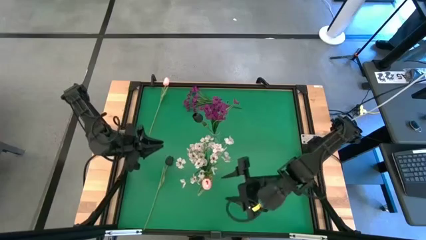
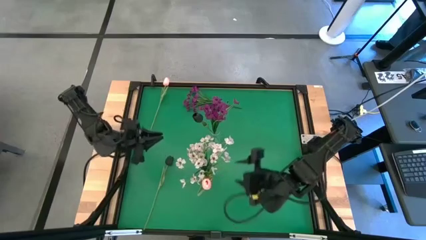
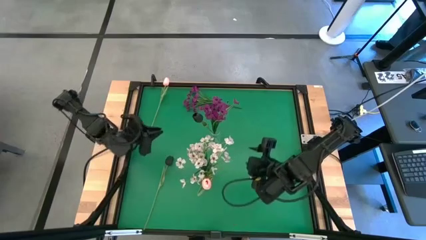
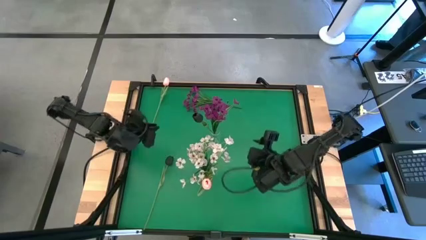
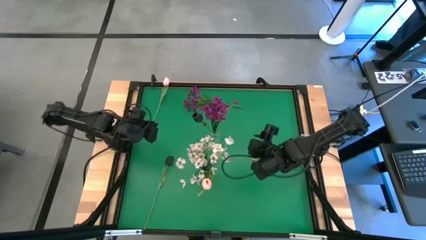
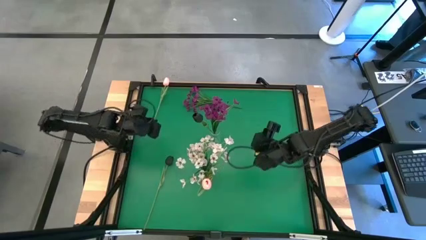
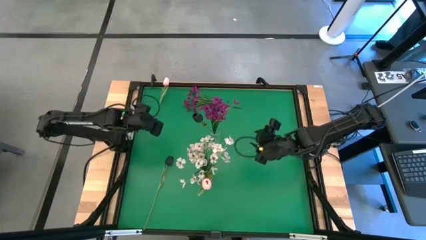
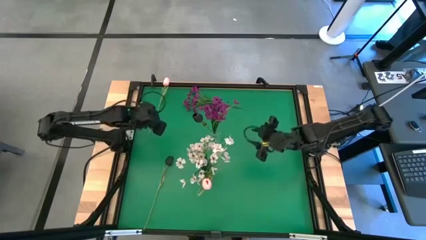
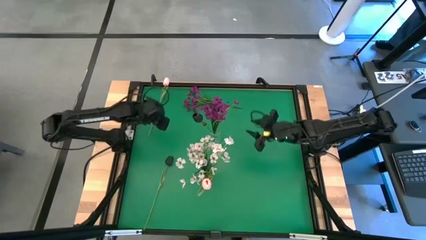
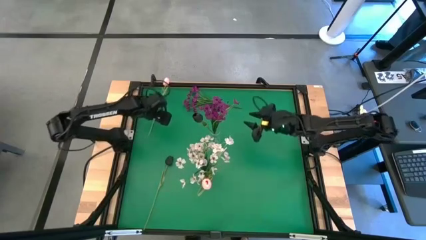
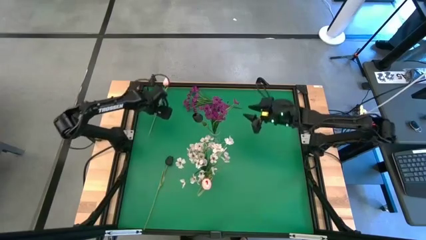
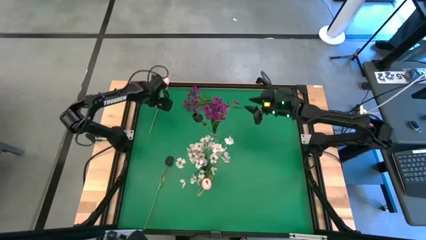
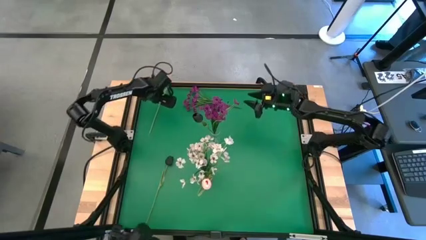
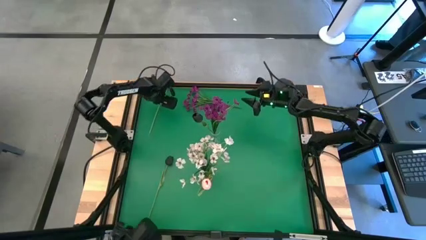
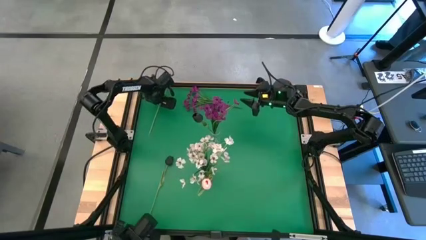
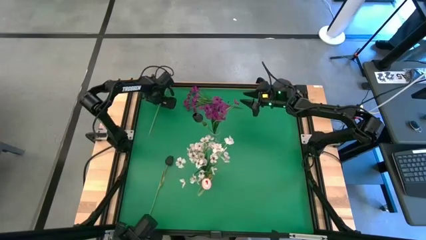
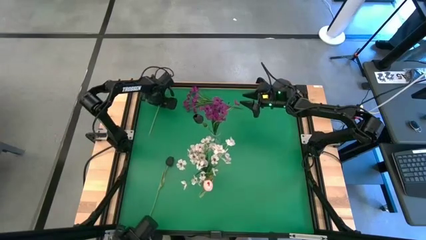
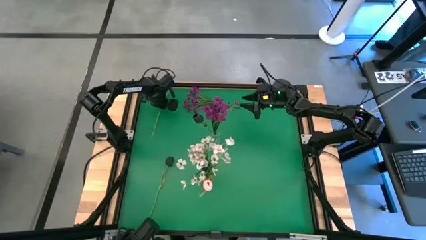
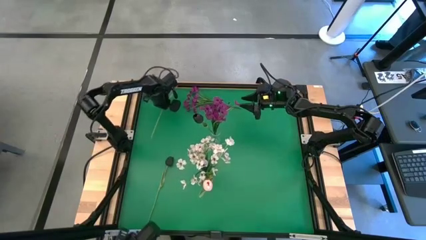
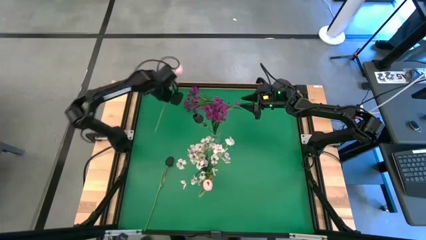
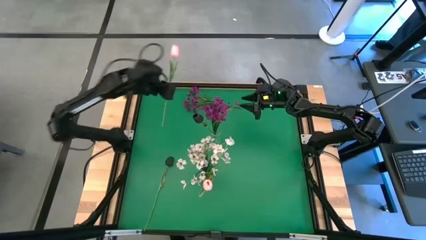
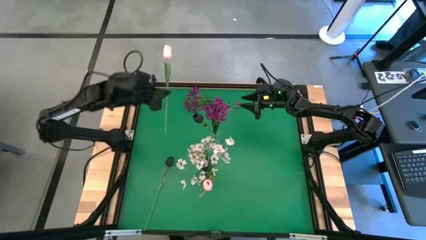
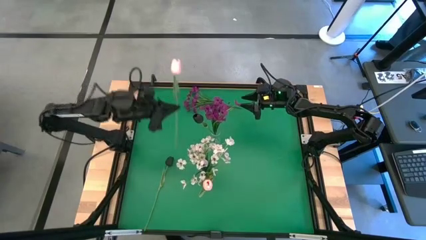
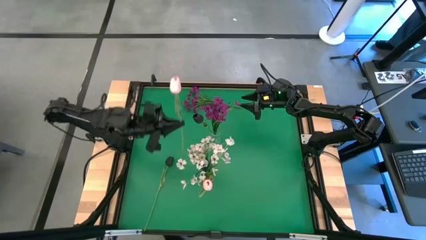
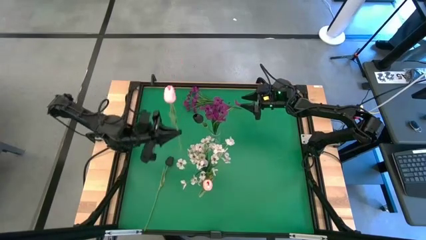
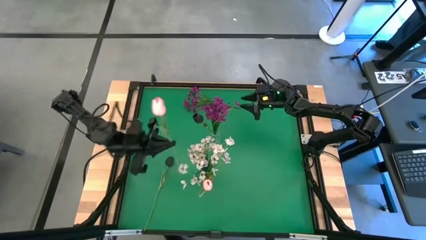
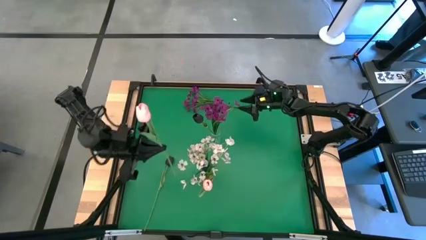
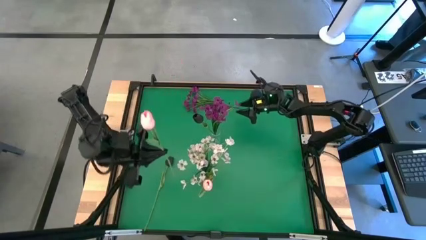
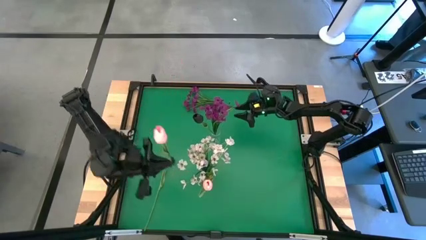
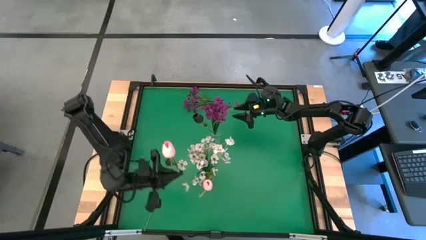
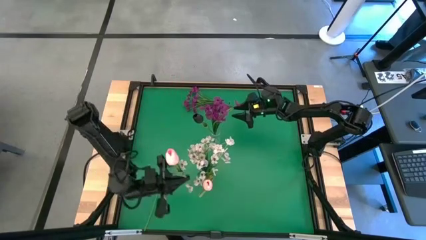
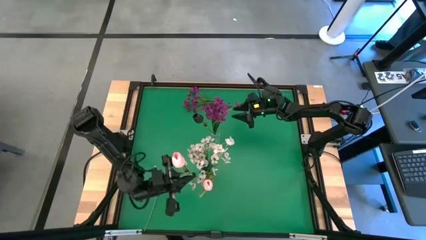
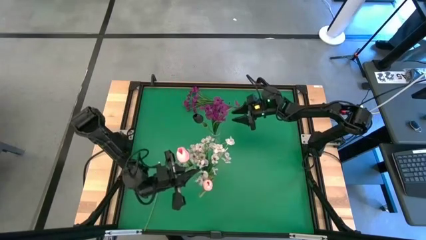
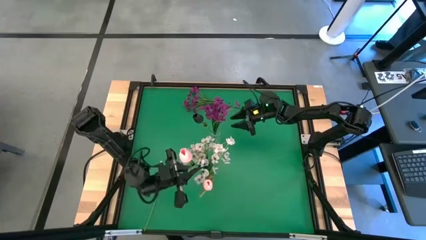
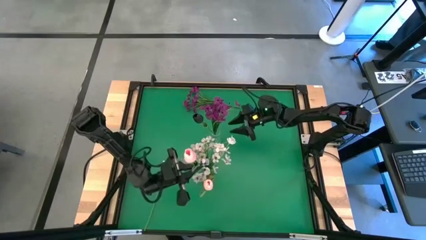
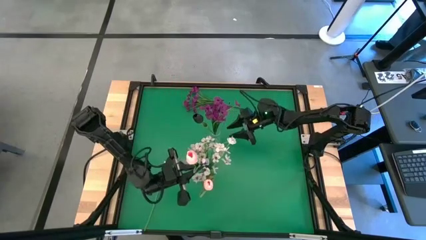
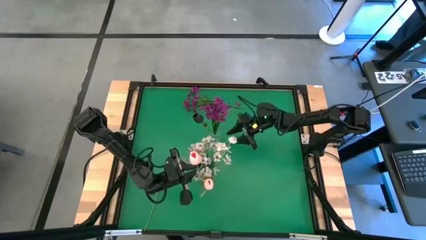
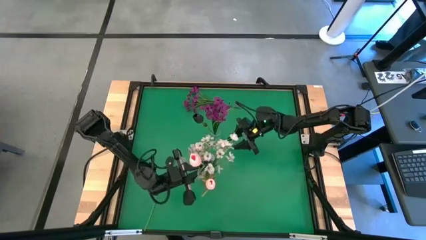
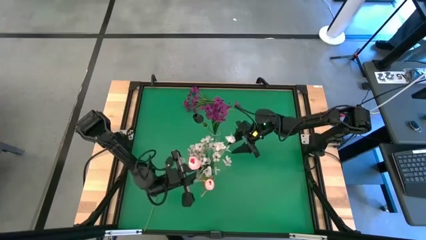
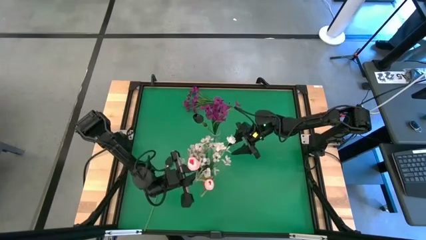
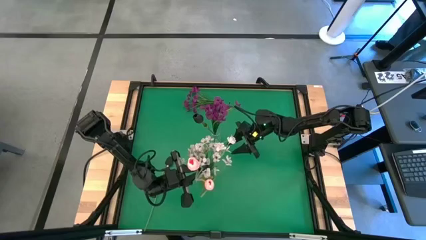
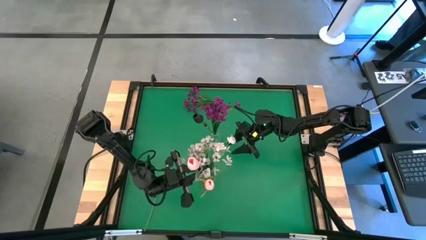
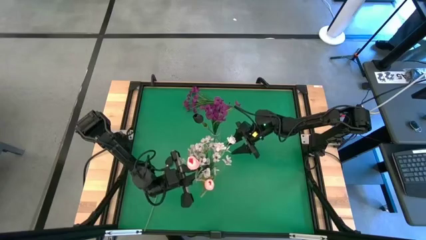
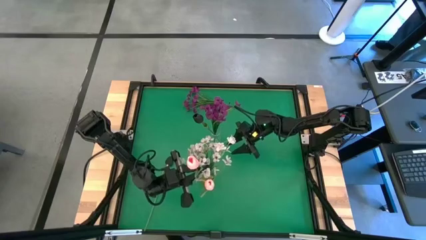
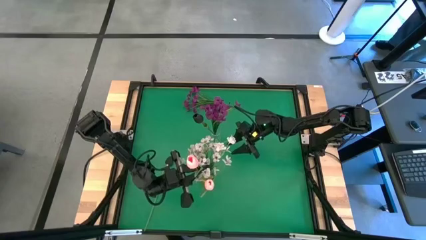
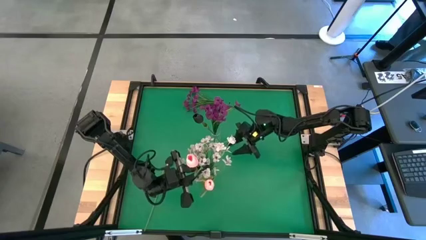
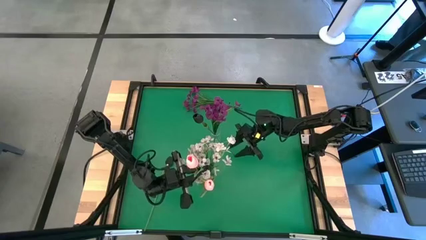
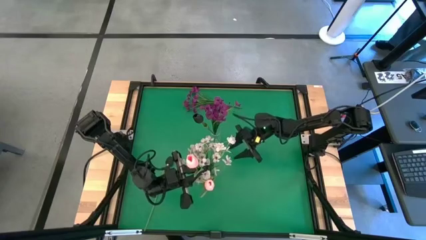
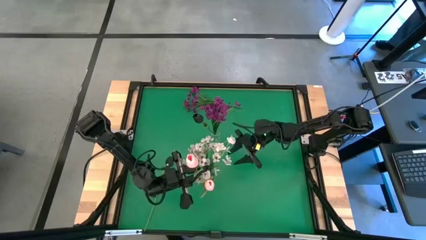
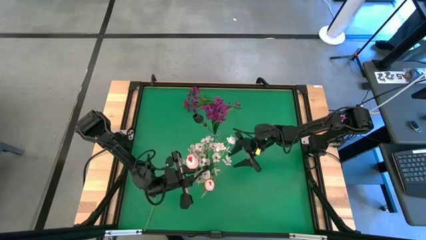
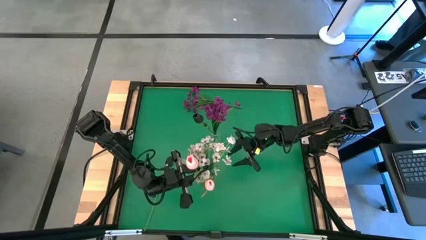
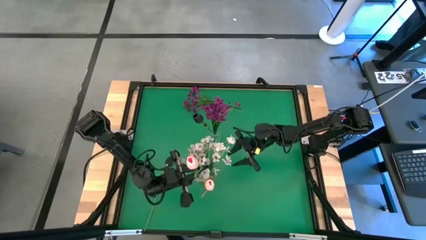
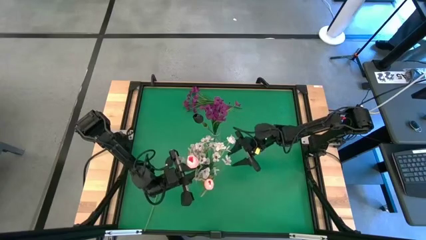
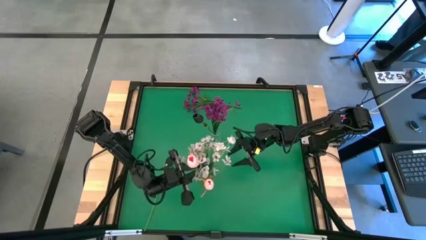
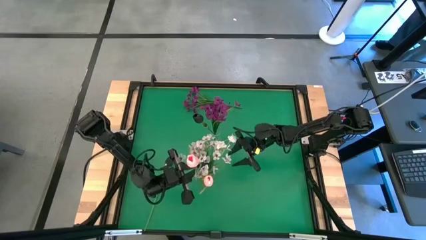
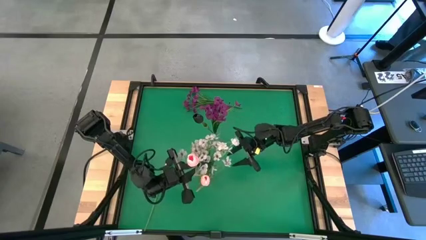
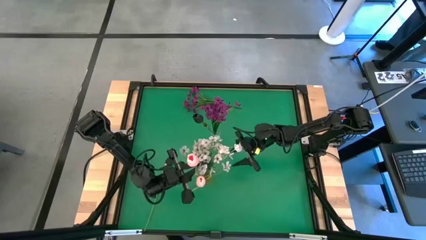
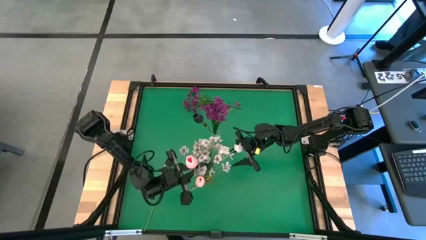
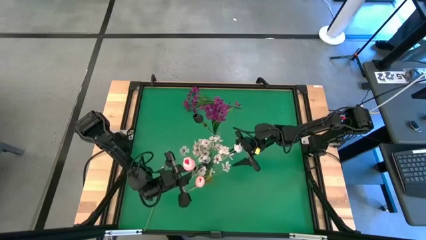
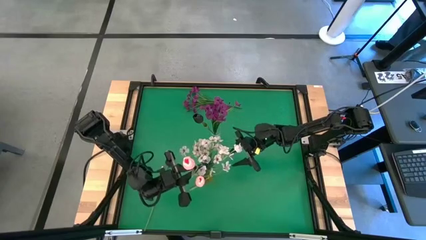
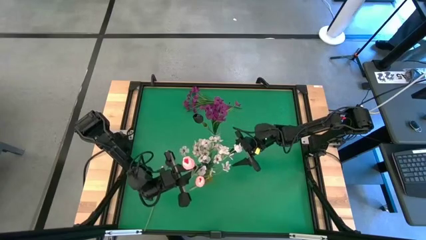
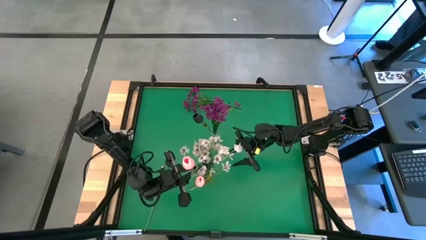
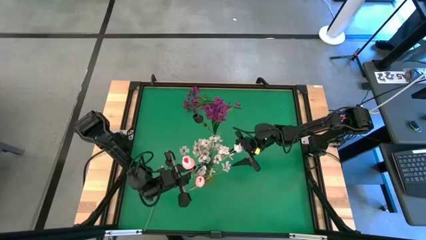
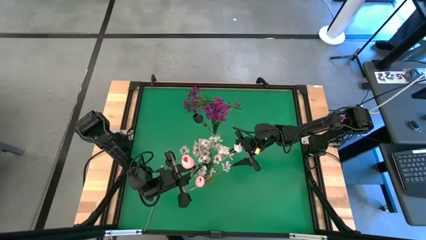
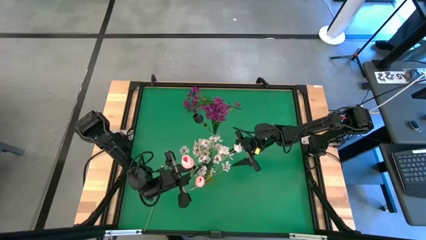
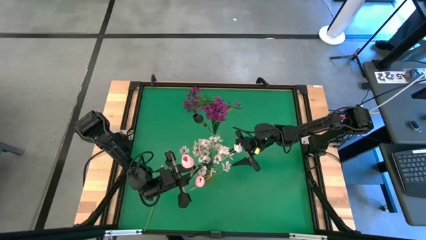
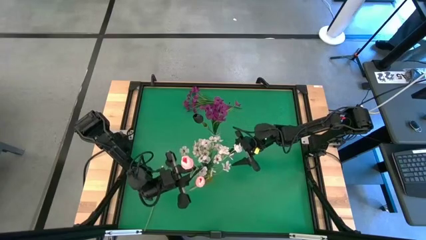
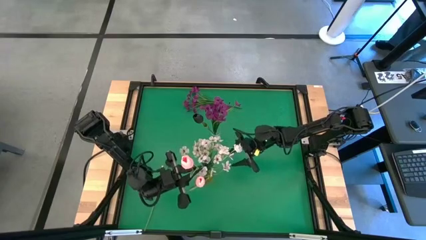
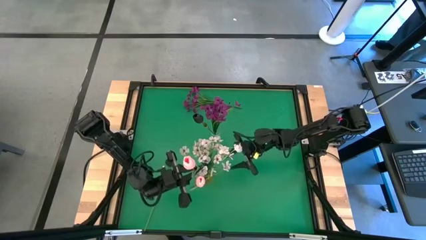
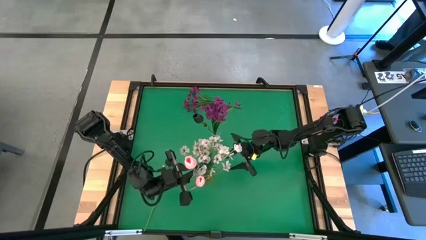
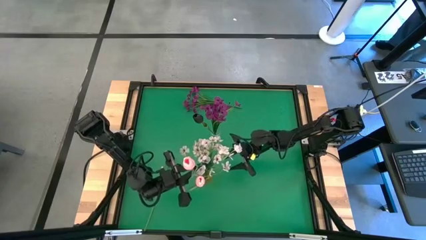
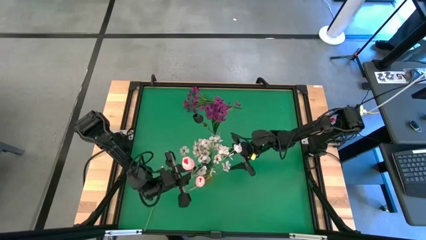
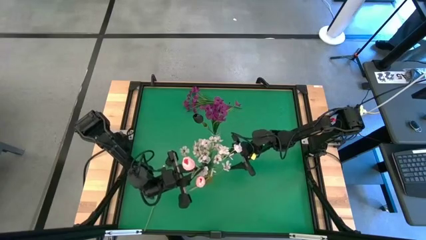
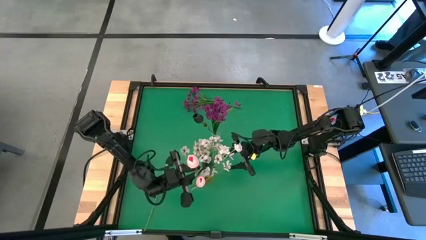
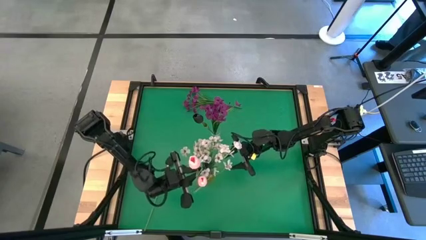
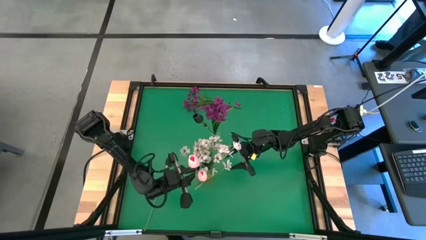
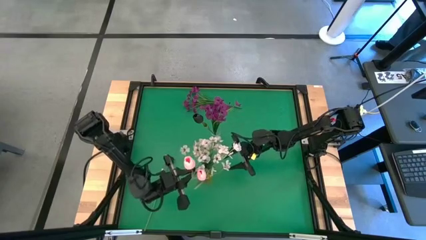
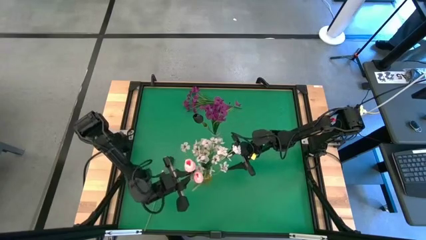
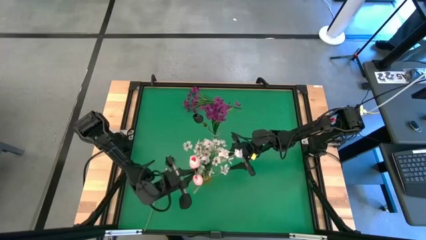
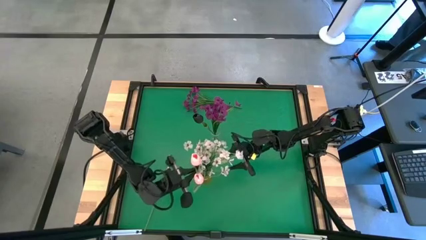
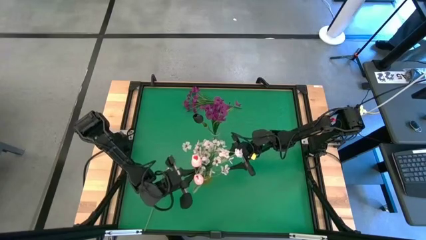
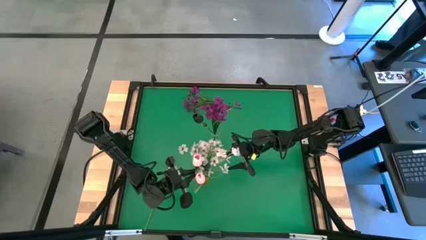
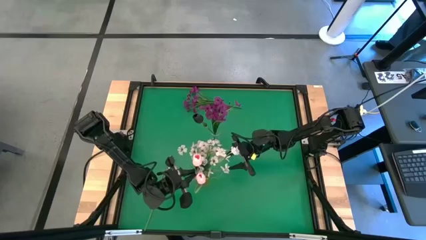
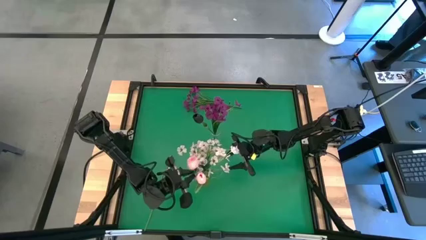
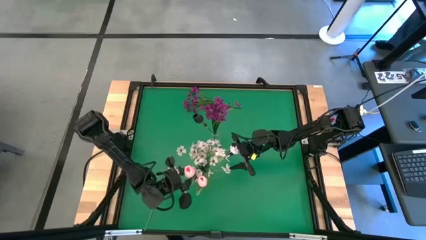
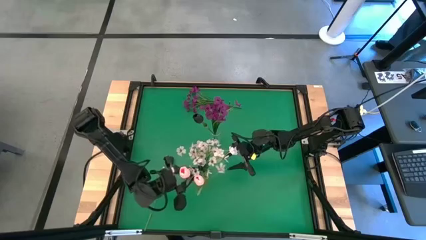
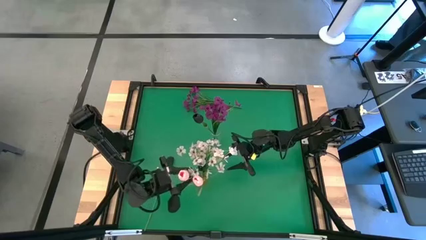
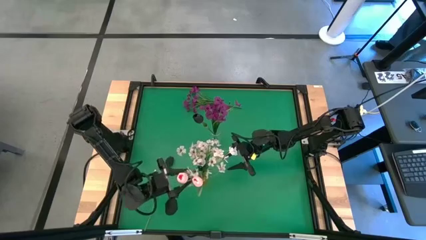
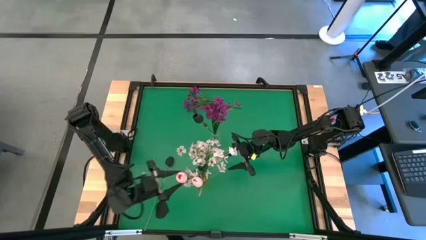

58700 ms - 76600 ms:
Task: Sort flowers into vase by color
Put the pink tulip into the yellow vase
